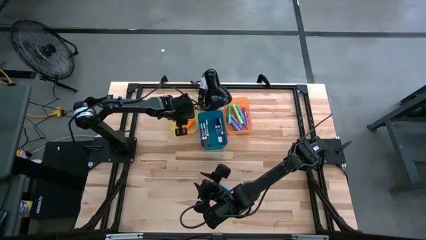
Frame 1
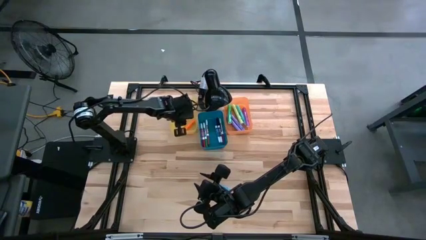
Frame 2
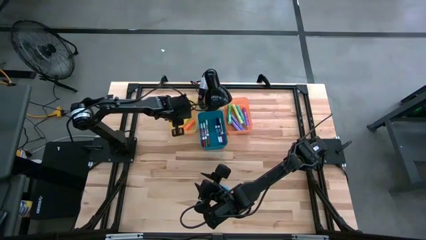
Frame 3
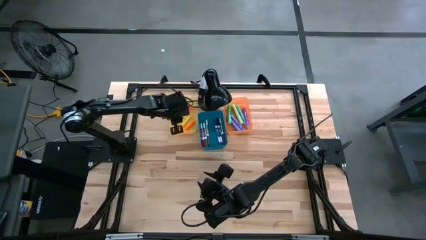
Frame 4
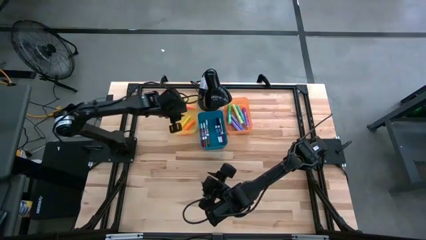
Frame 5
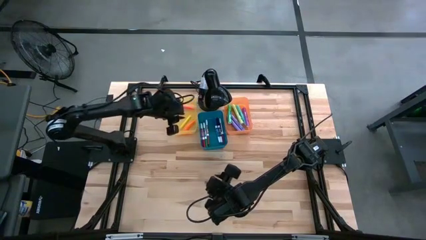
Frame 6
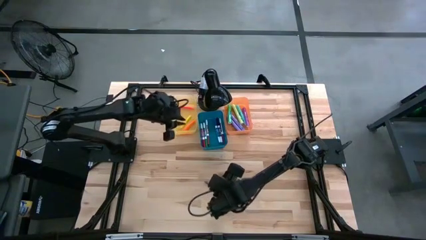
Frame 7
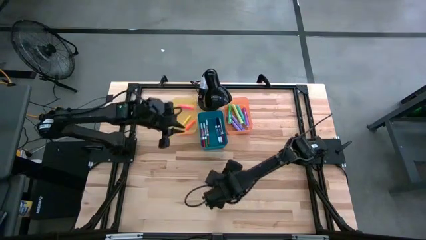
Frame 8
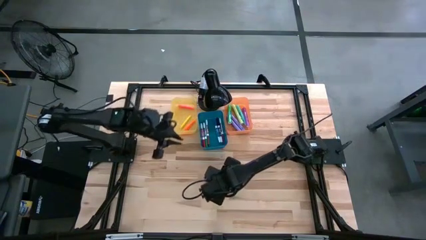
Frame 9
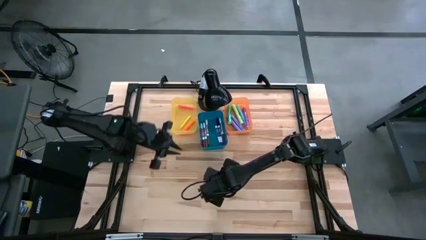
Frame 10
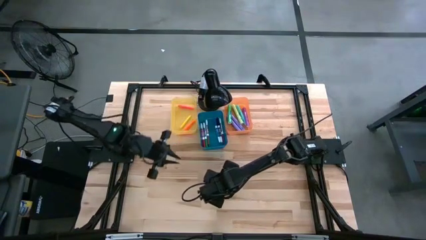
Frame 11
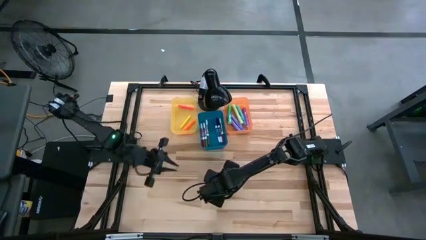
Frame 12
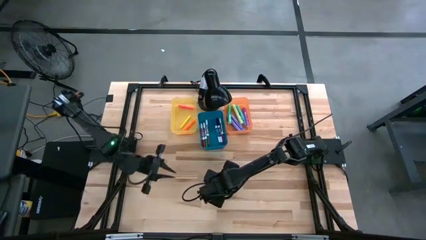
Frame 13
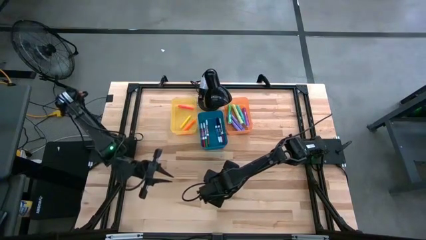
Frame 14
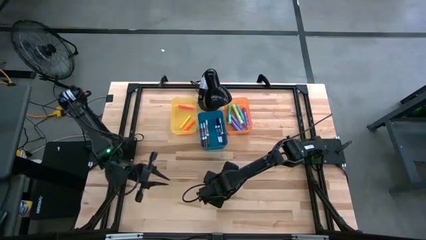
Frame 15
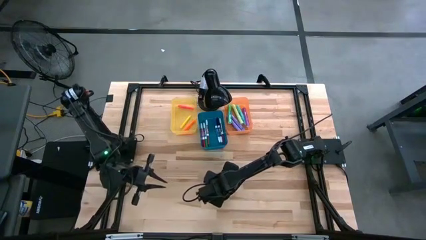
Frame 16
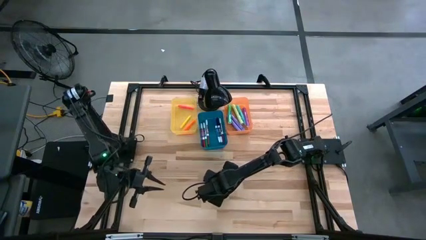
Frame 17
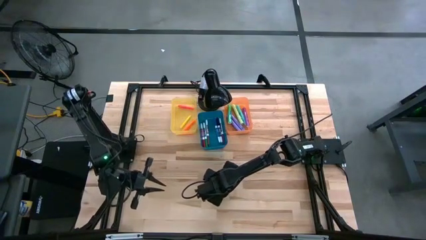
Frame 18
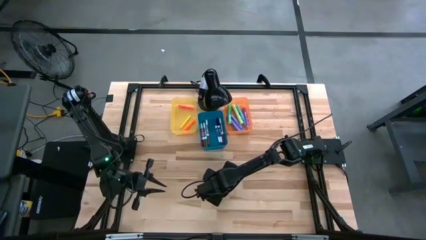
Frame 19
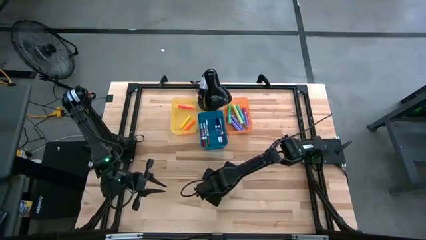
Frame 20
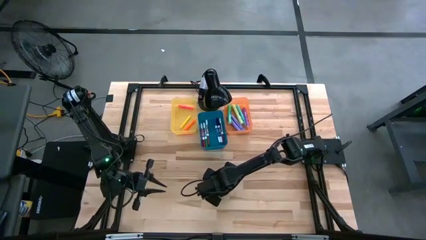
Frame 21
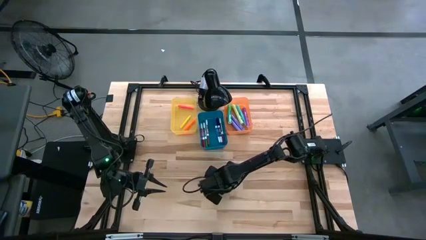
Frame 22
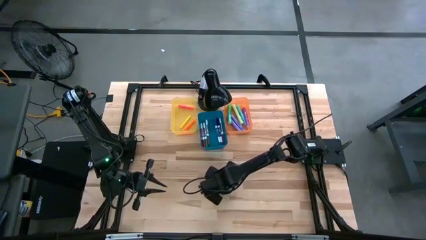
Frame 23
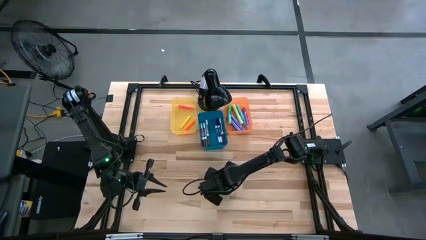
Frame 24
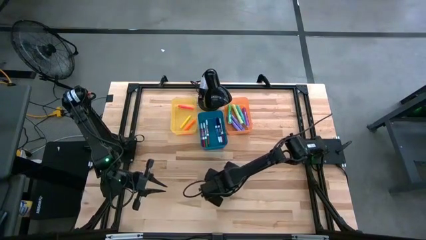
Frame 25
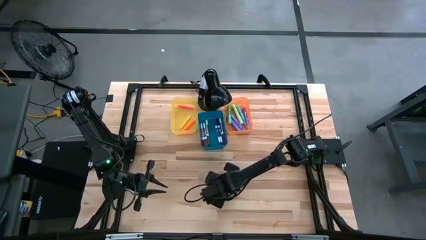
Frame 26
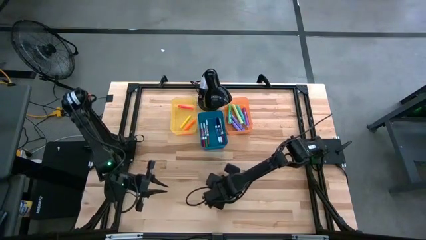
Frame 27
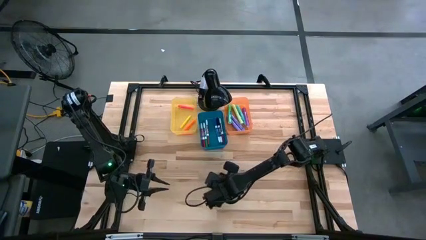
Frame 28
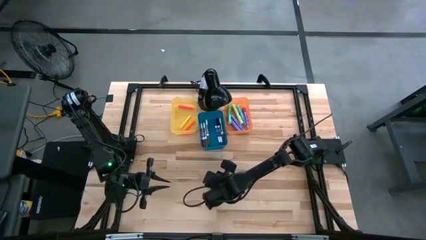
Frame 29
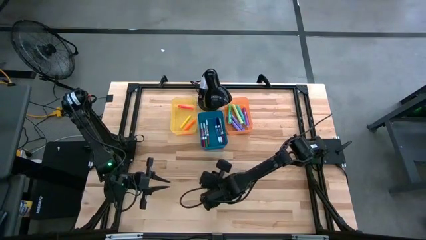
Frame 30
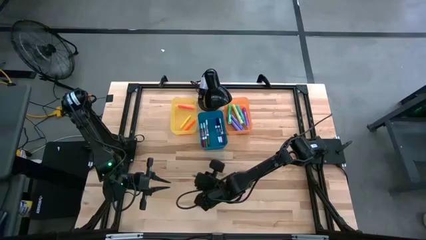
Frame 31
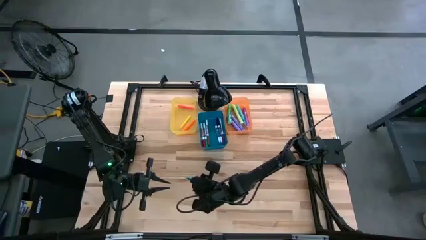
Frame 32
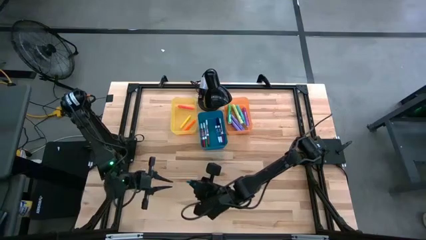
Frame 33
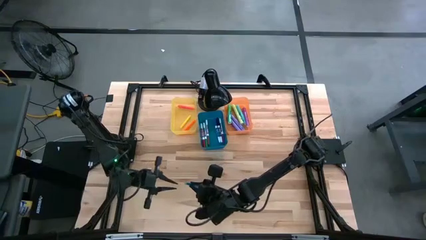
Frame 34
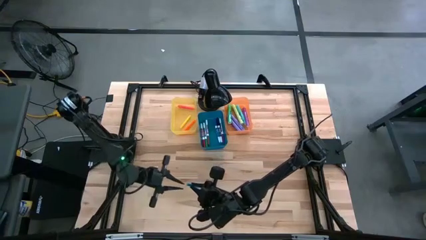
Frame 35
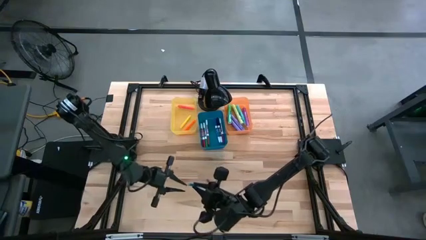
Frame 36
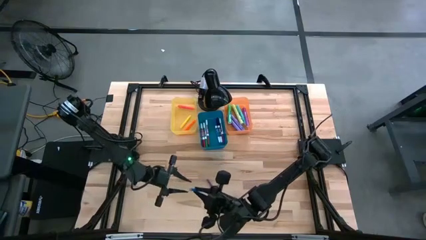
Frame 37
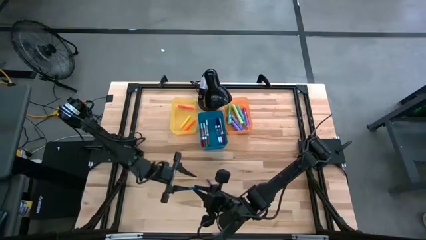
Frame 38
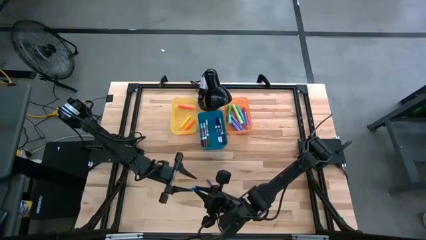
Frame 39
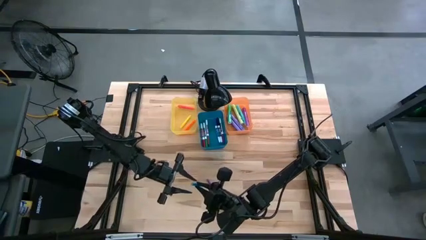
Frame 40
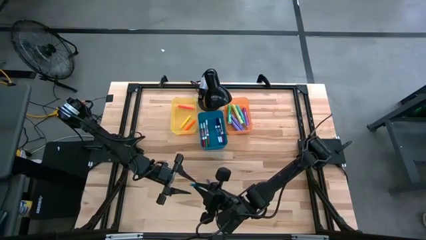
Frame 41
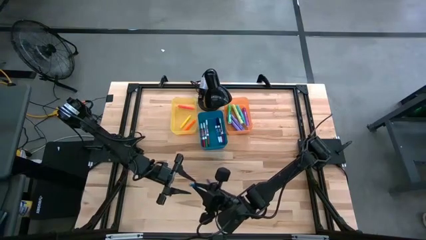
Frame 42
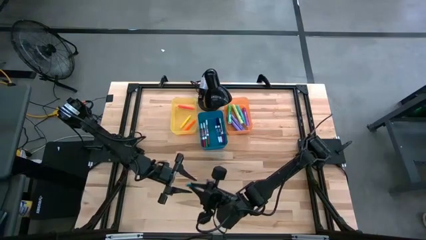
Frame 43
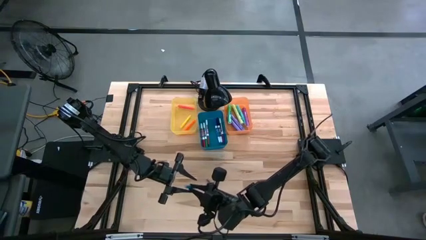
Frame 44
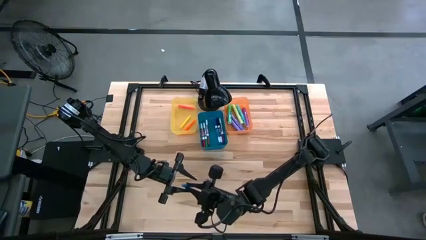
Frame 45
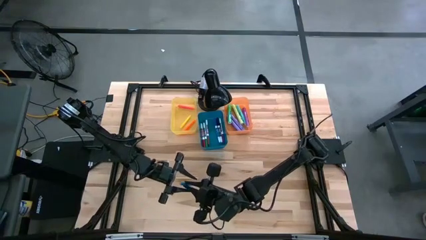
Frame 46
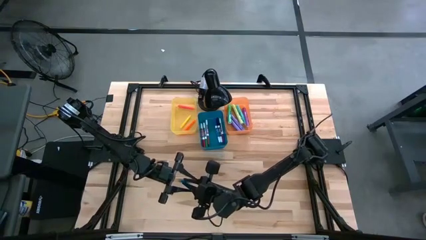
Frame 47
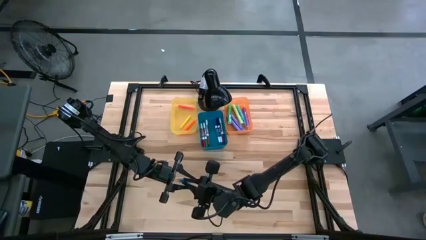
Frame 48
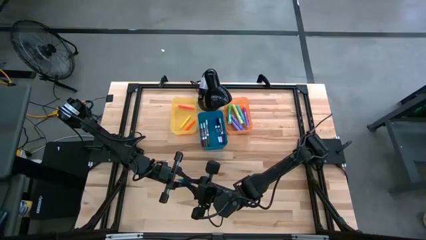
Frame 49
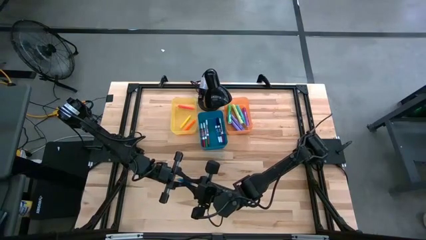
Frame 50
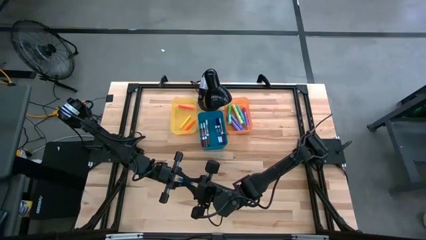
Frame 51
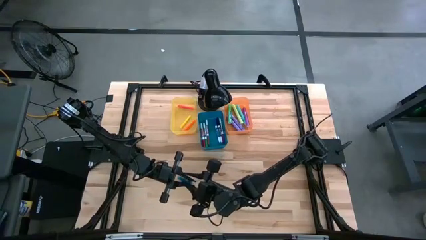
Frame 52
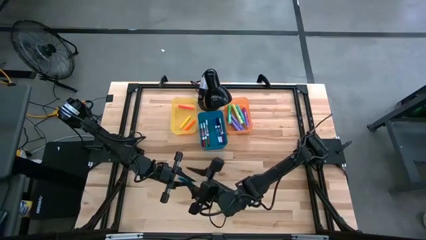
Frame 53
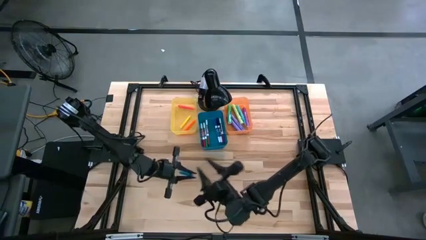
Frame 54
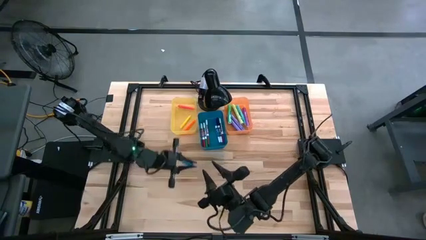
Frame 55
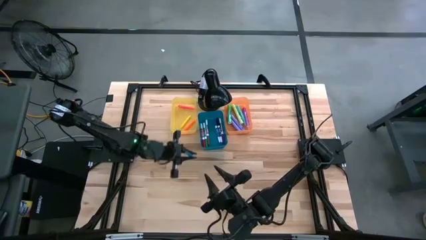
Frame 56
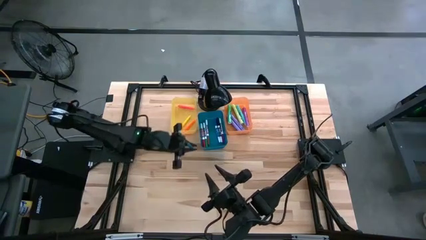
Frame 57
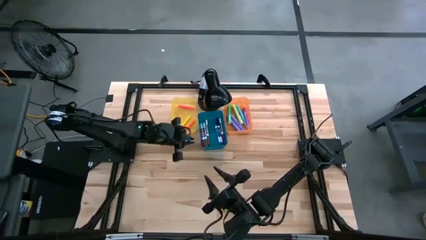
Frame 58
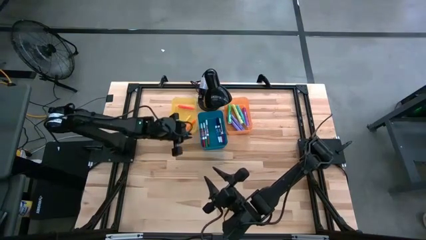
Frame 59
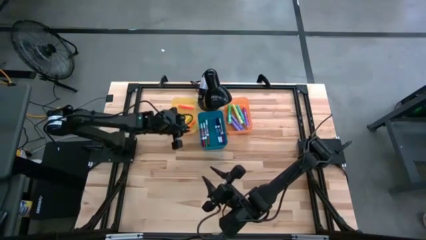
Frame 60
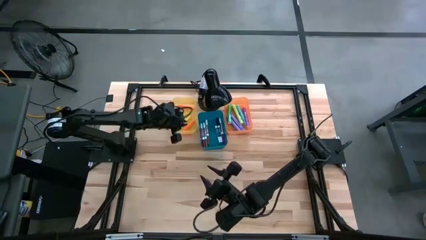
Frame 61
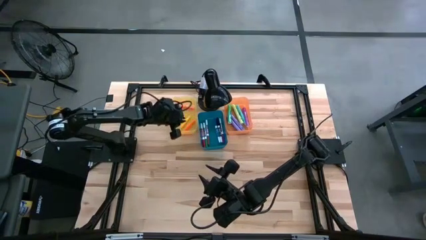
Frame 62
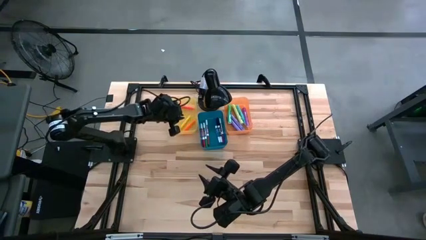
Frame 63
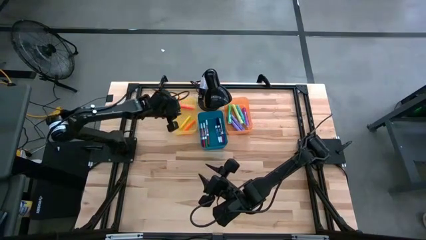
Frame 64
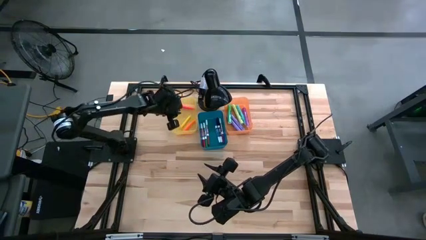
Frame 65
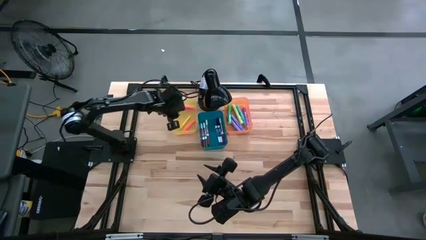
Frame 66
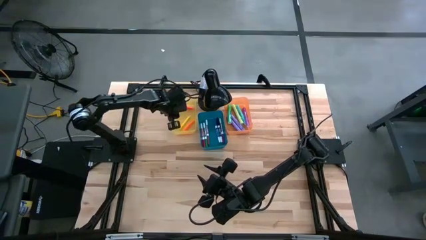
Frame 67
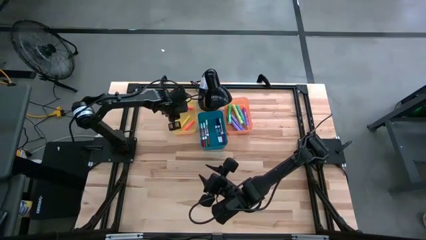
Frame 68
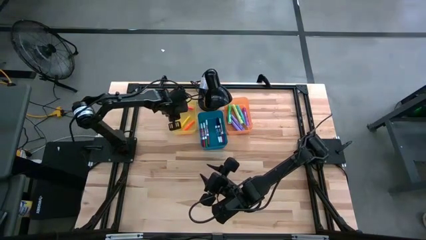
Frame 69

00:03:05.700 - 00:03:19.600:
Task: Pick & Place Markers
Put the blue mini marker into the yellow bin

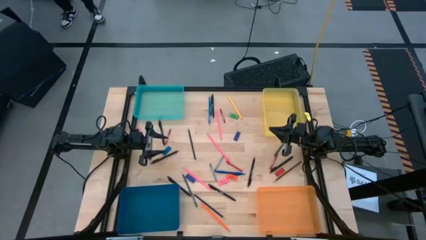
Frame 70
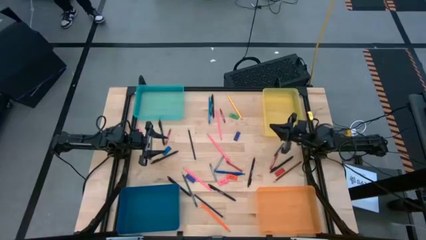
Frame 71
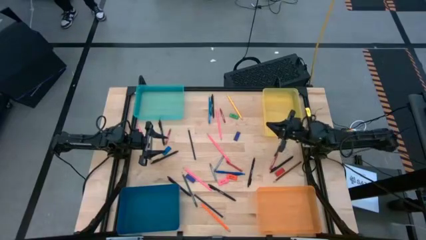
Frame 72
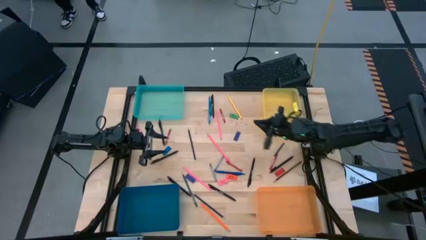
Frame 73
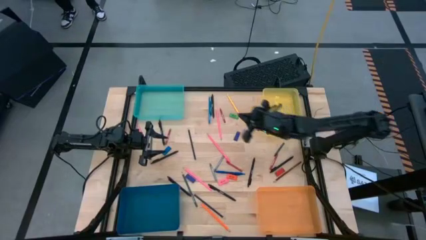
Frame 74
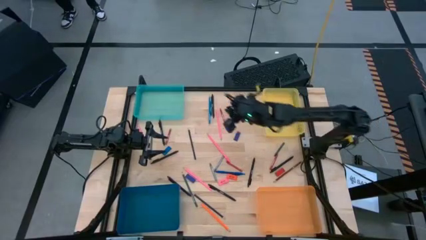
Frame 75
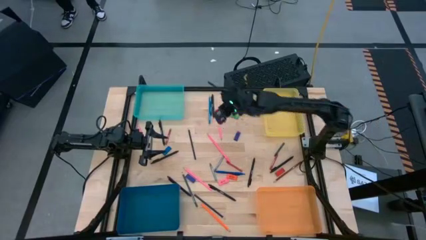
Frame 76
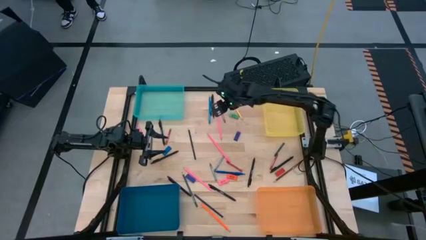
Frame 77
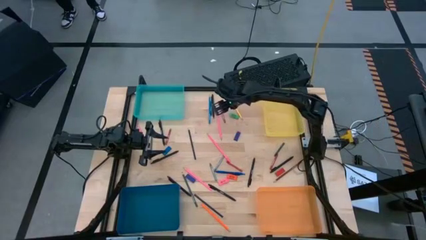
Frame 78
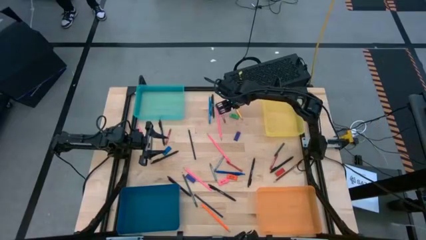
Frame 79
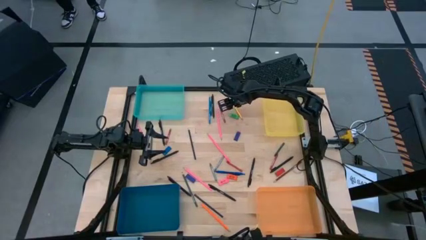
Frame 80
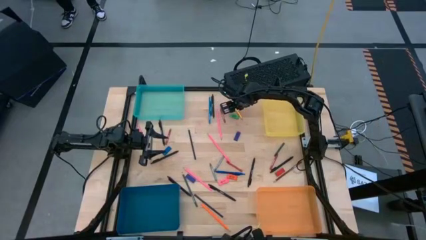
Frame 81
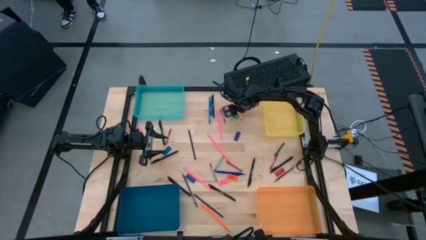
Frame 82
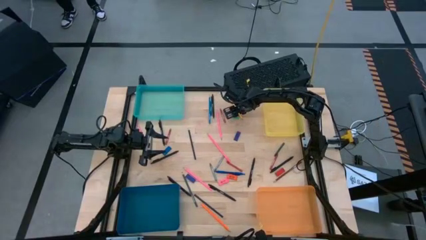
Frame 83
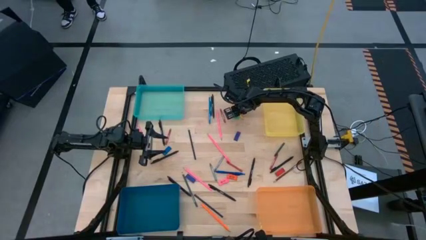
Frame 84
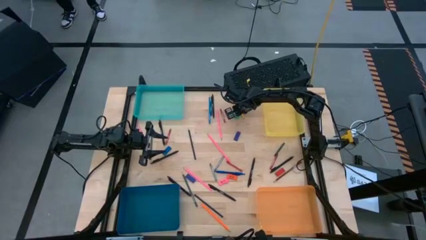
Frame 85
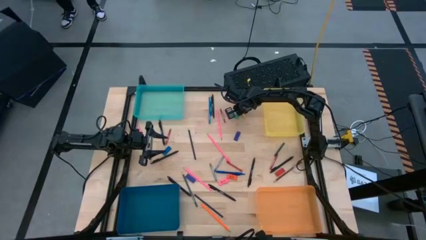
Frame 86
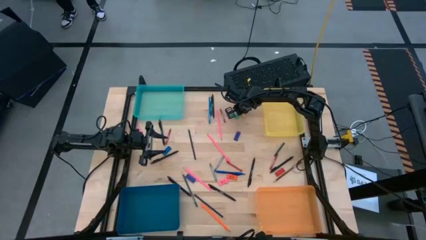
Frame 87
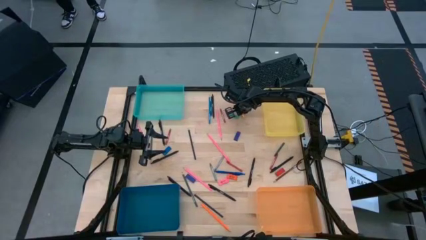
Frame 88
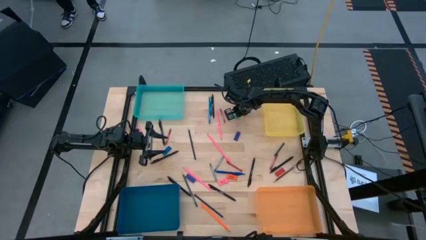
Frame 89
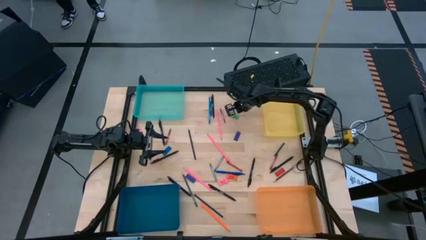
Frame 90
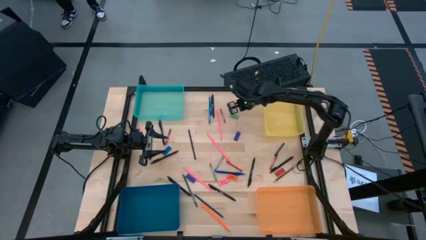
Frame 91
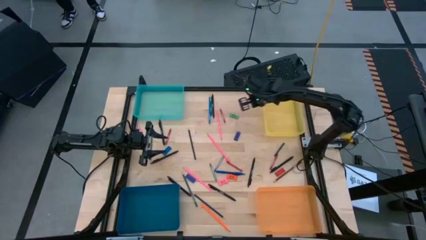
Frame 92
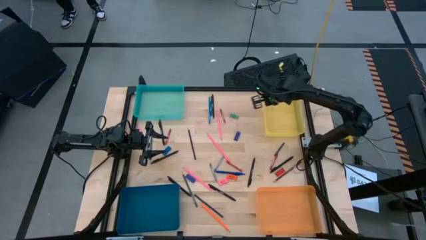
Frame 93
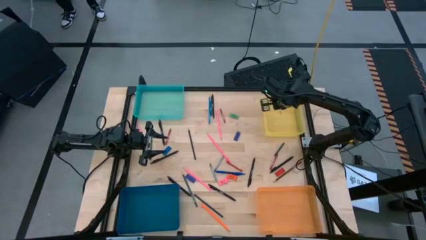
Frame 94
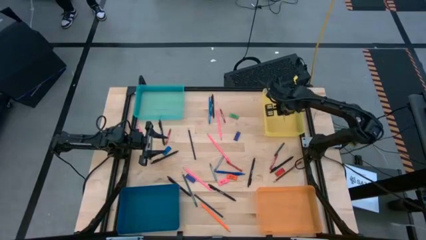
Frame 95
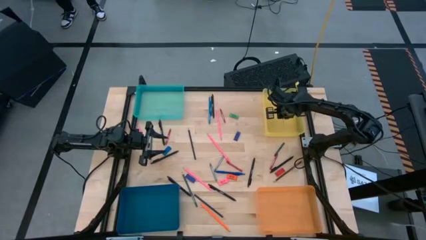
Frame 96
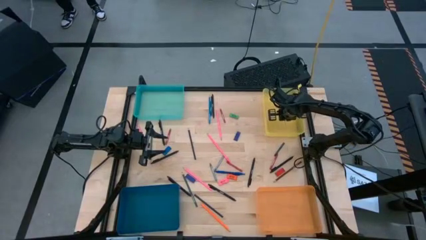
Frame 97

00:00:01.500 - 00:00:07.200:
Task: Sort crayons/erasers/pens/pencils in bins
Put the yellow pencil into the yellow bin
